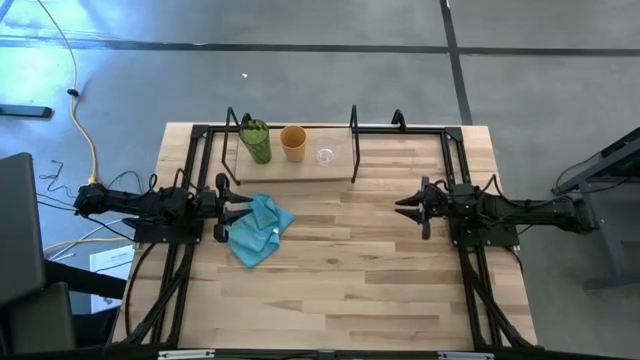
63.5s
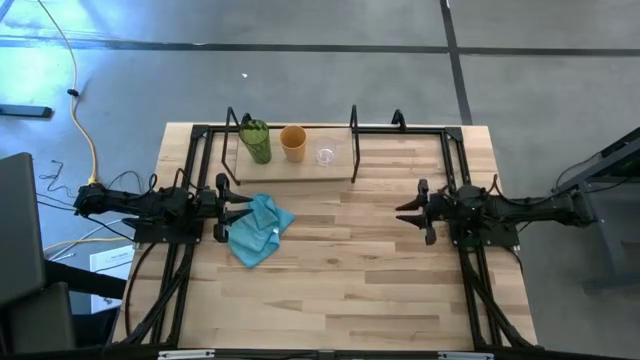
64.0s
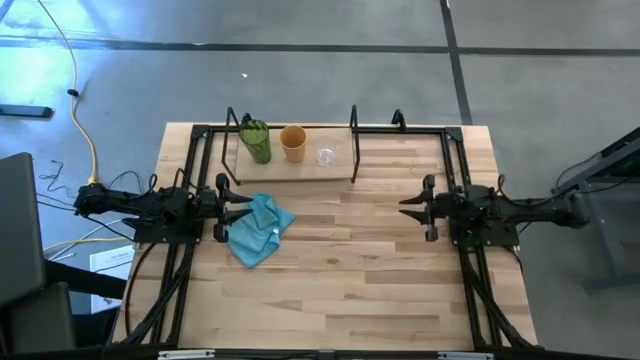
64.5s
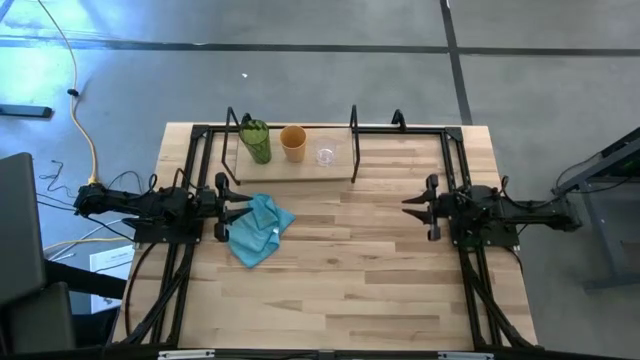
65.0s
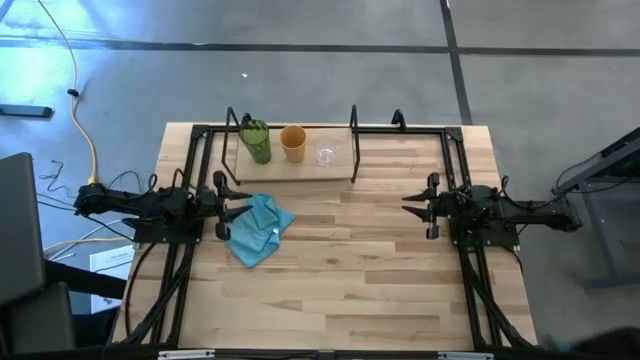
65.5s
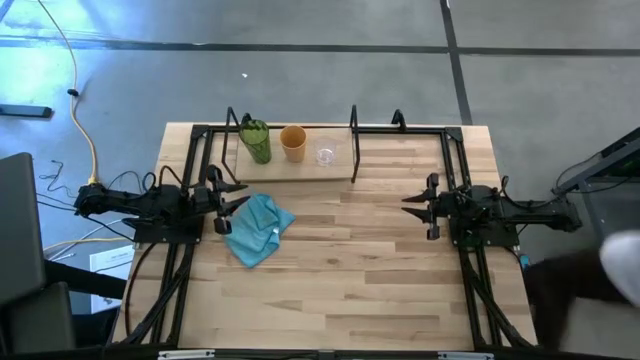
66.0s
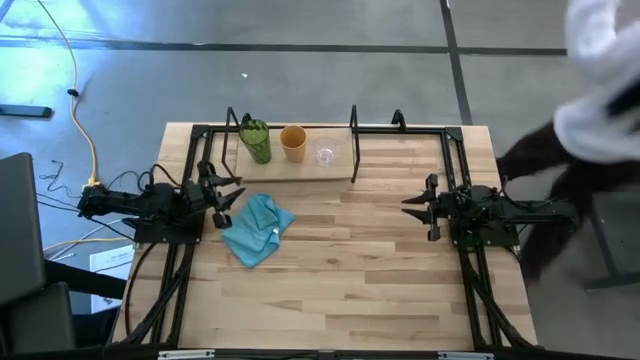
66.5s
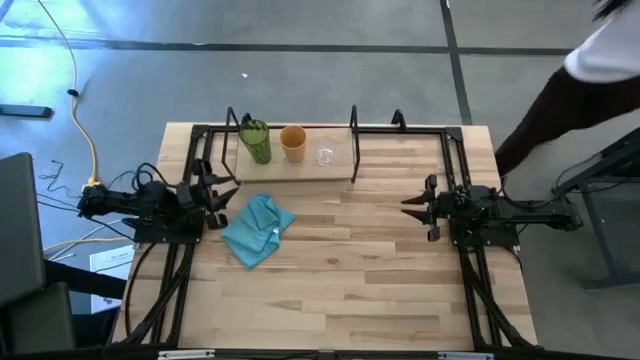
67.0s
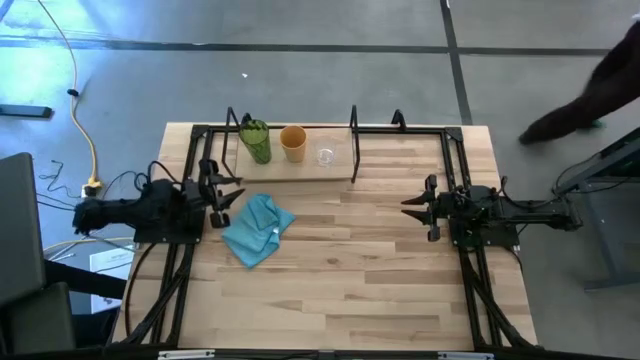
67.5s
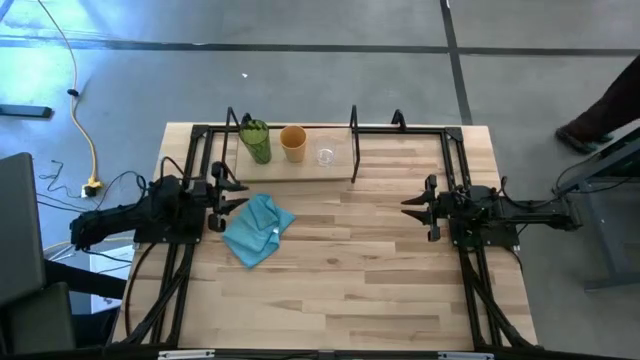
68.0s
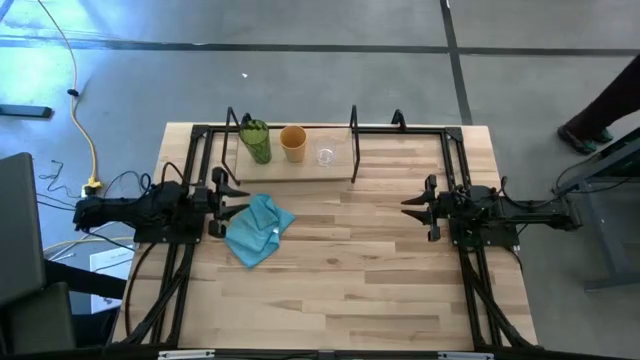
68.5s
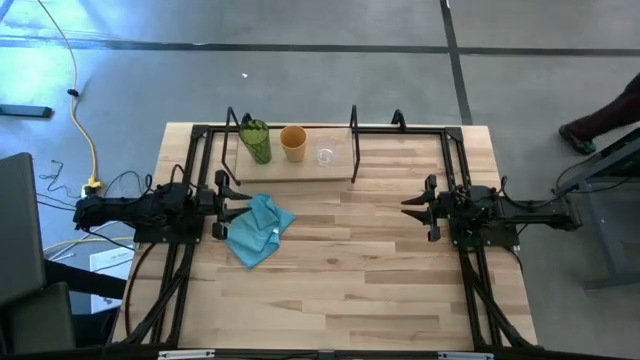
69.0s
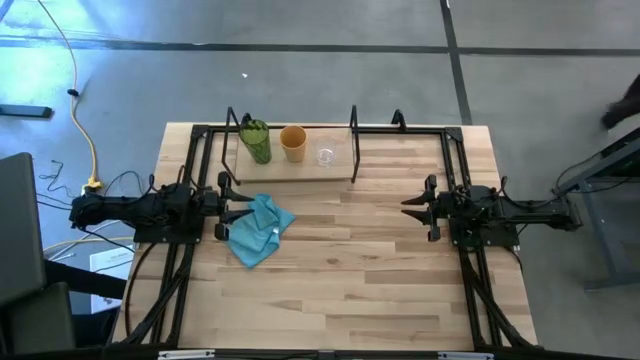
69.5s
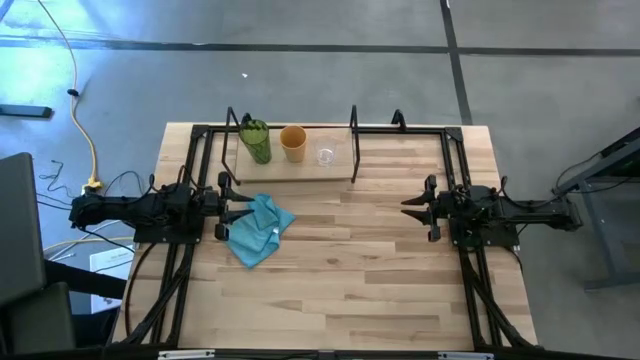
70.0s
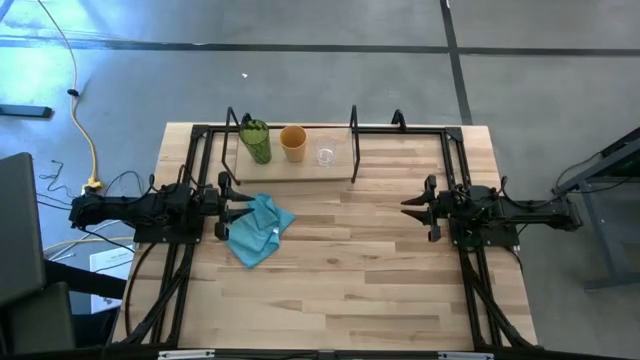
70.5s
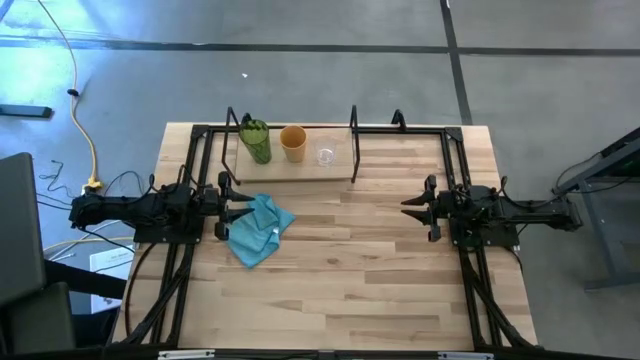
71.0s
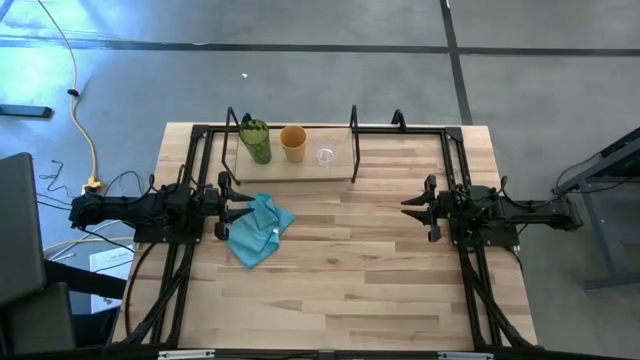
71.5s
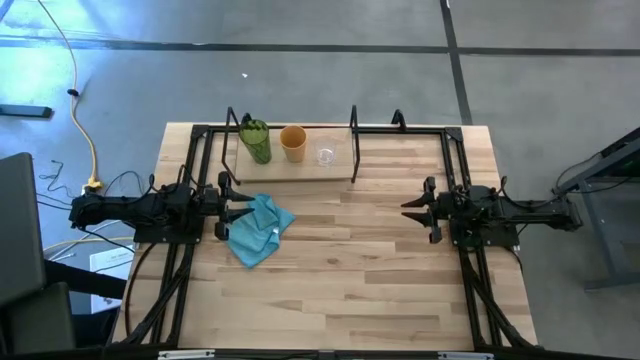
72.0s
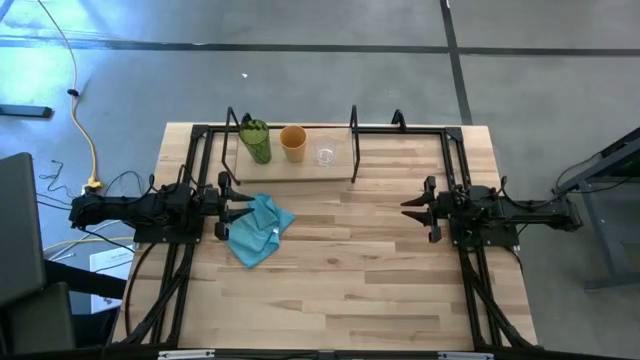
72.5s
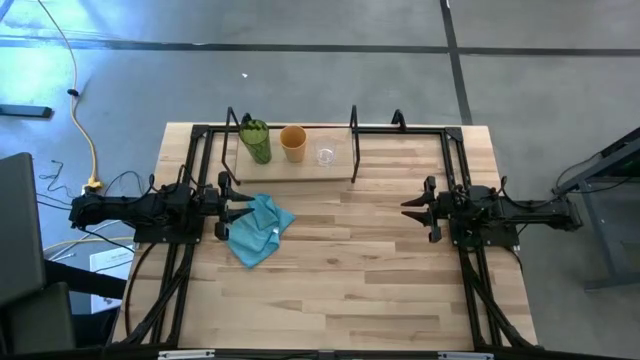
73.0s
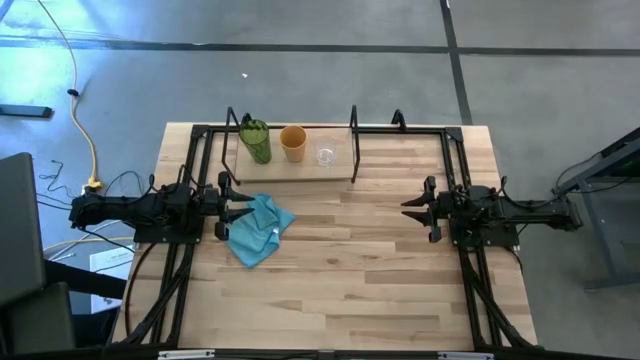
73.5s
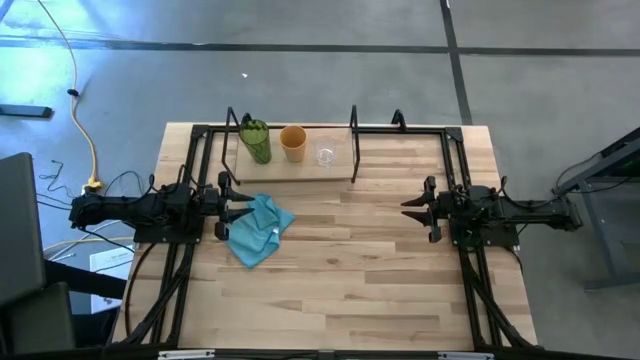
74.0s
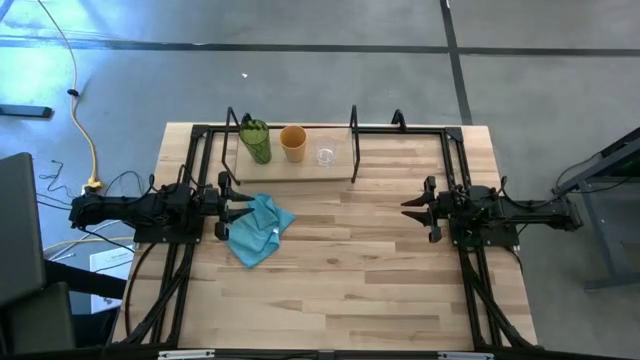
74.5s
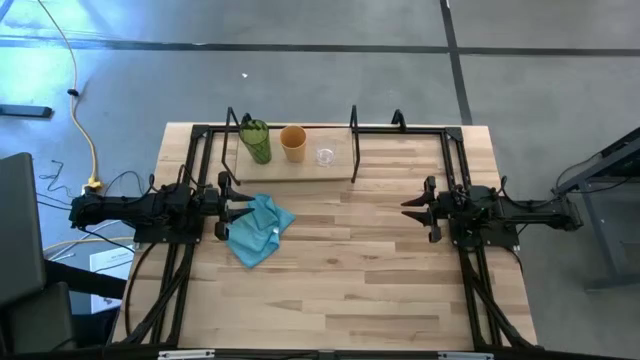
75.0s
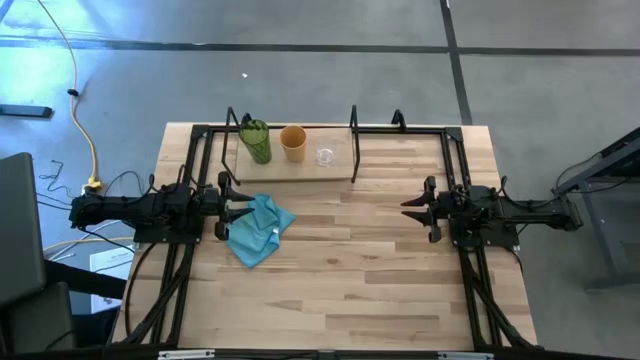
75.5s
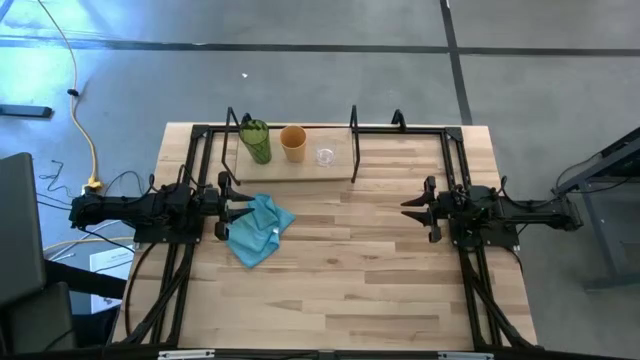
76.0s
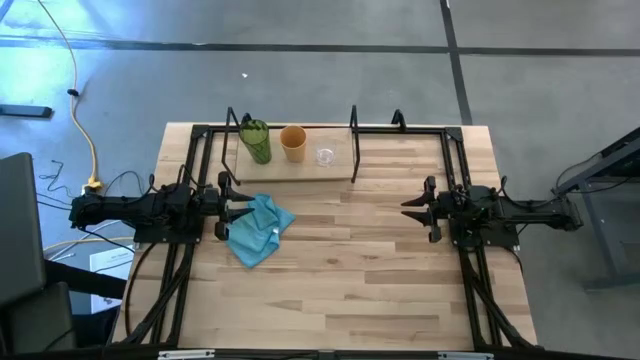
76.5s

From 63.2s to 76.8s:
Task: Stack small to large cups/mugs on shelf
Return to Home Position

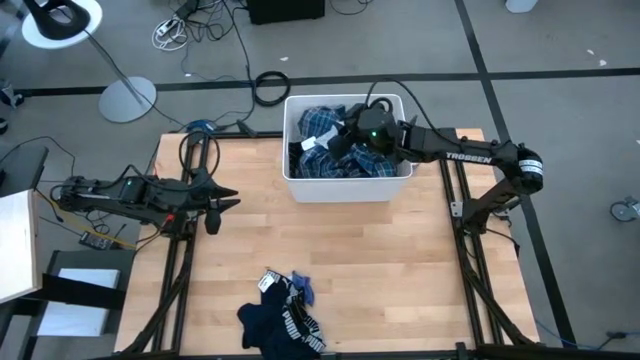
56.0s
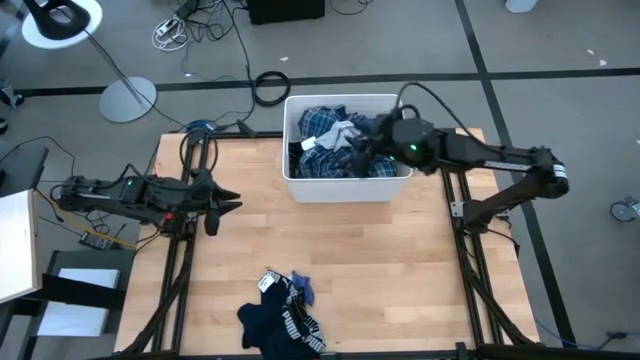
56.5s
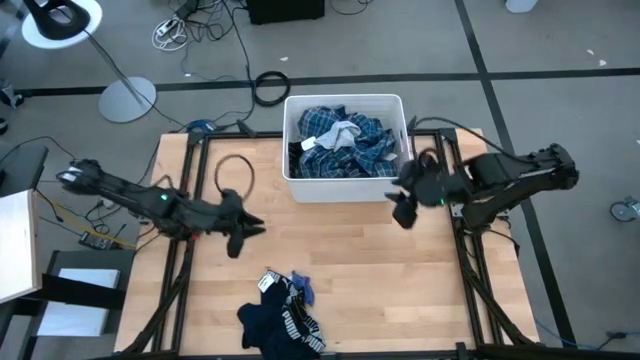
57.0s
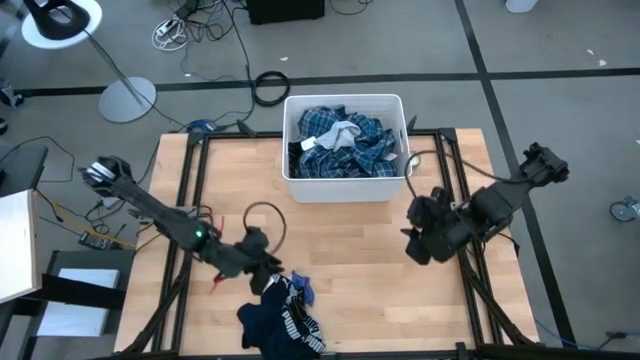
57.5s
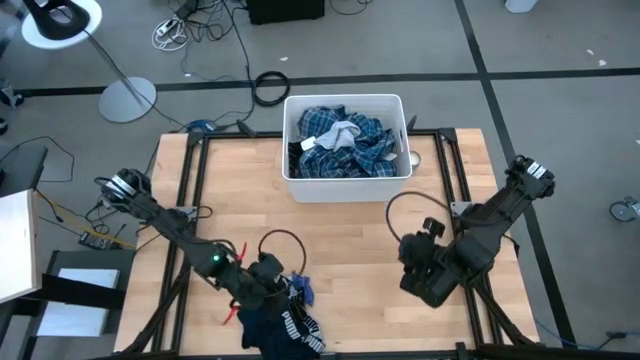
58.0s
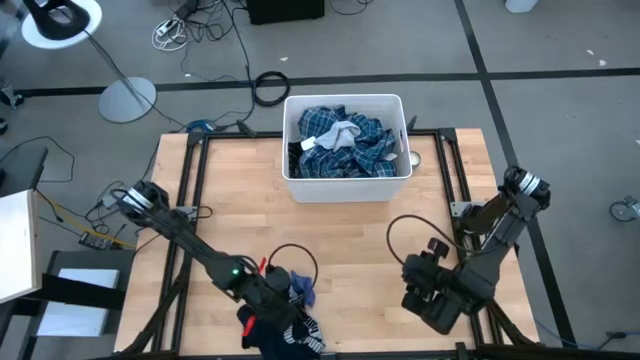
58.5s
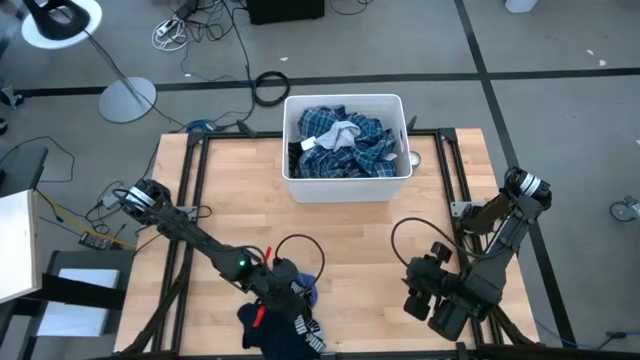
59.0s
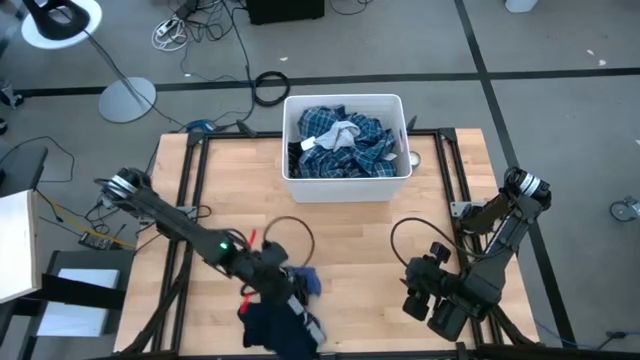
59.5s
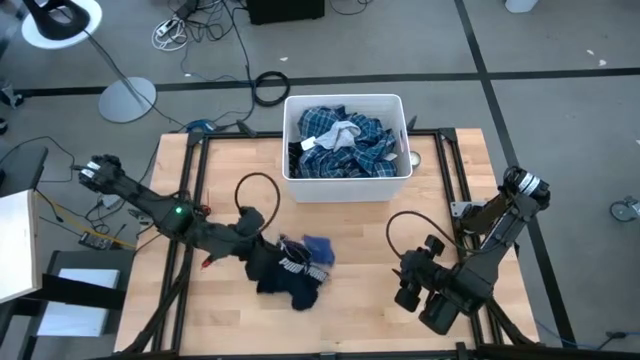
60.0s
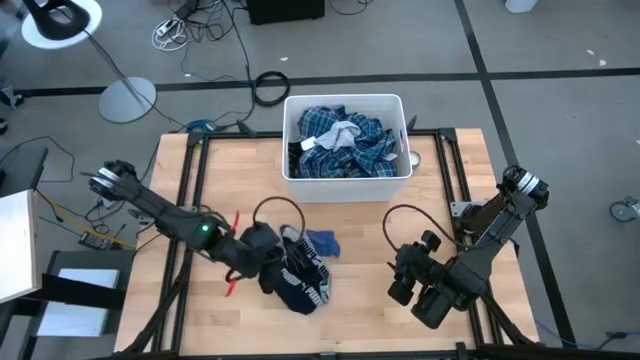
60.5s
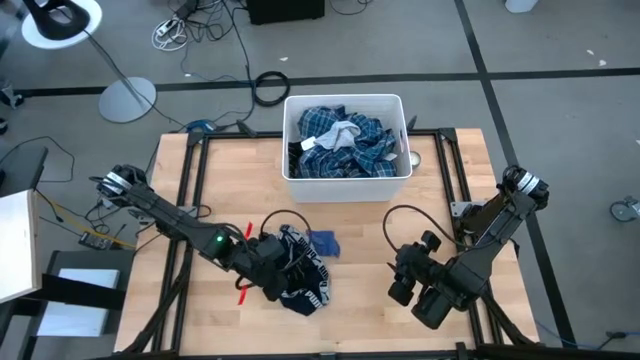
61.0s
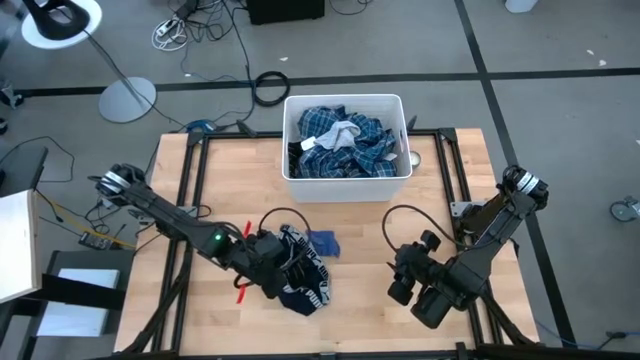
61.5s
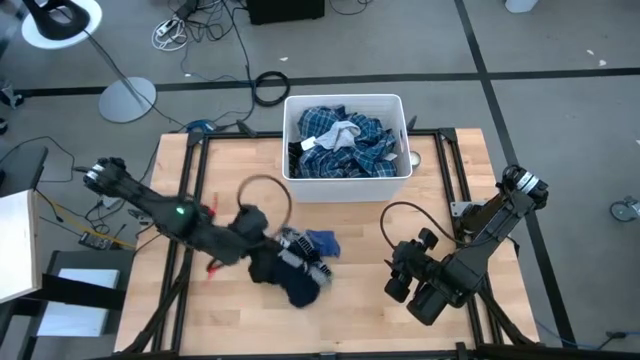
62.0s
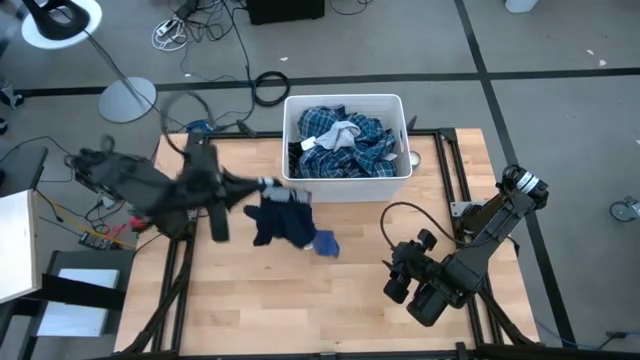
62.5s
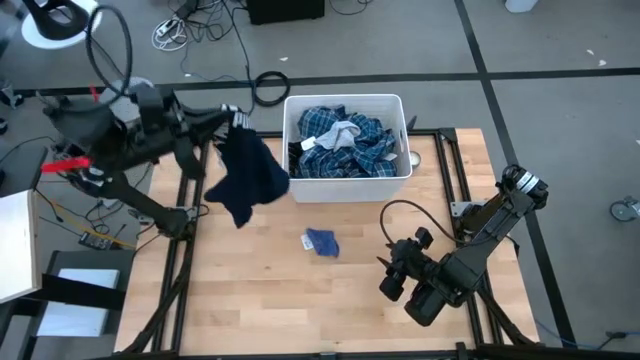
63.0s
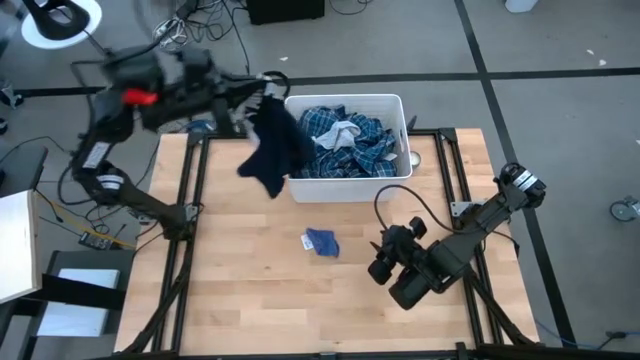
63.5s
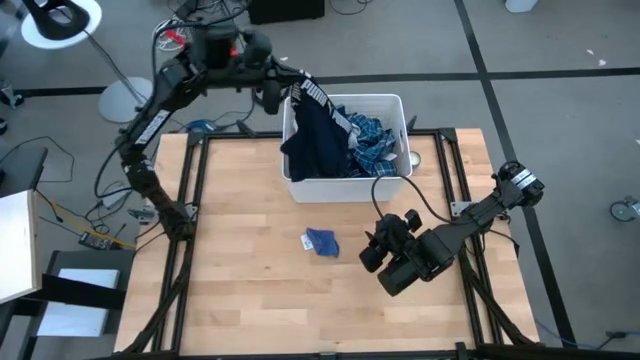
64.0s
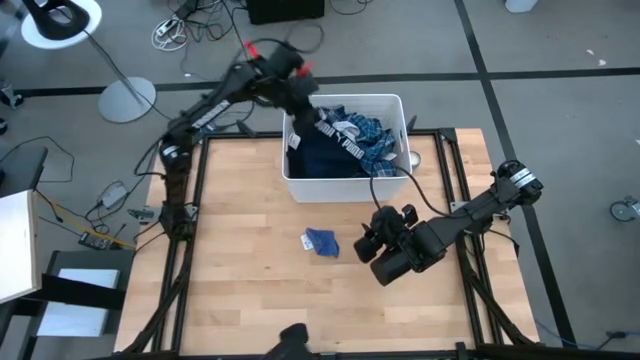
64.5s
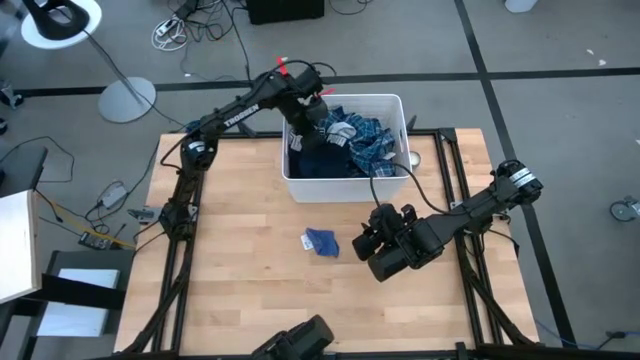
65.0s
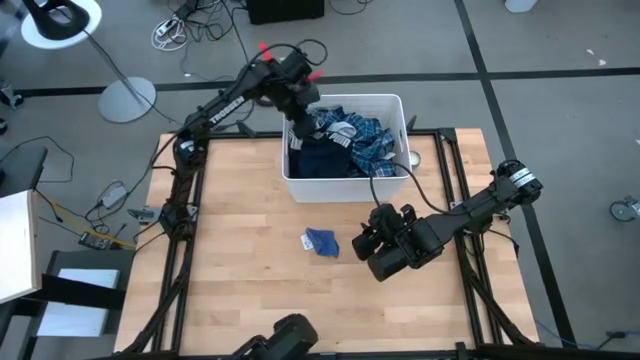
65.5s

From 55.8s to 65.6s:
Task: Sort clothes
Put the black boxer short into the laundry bin
